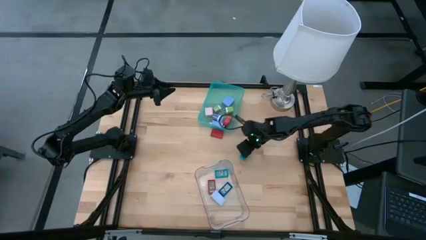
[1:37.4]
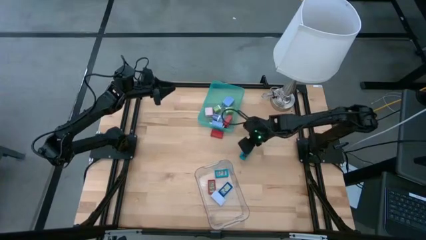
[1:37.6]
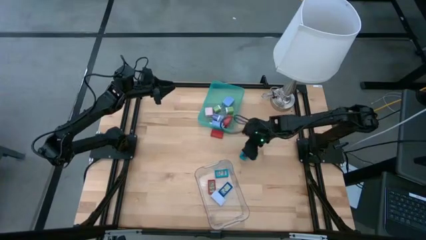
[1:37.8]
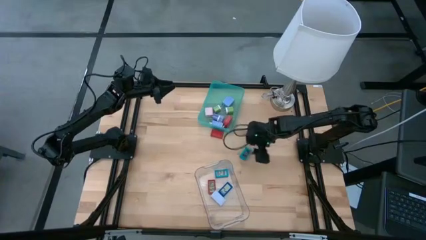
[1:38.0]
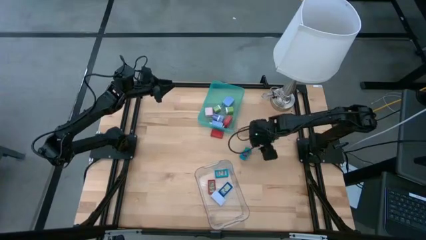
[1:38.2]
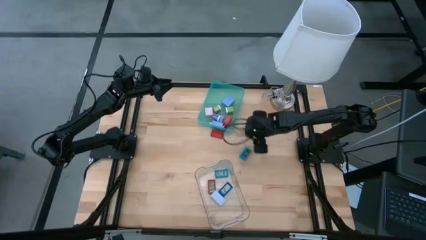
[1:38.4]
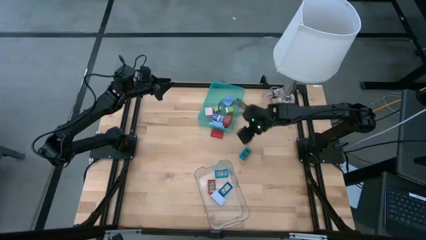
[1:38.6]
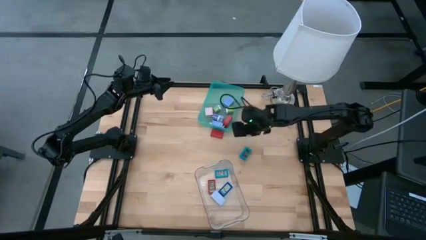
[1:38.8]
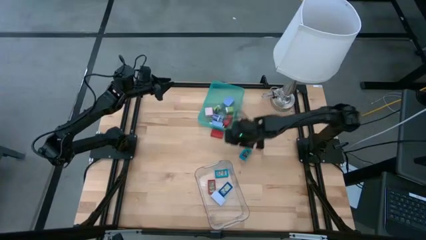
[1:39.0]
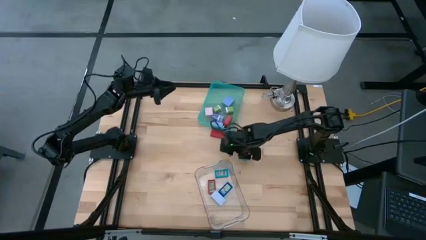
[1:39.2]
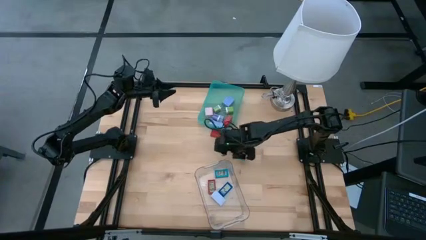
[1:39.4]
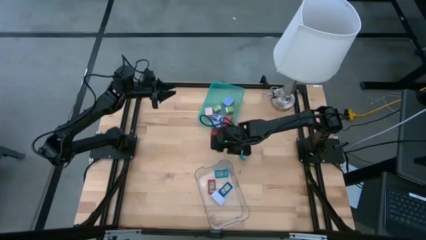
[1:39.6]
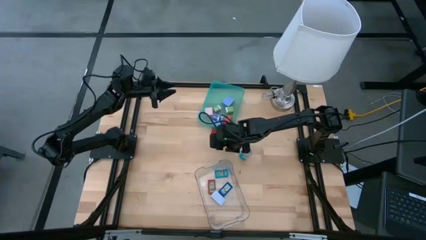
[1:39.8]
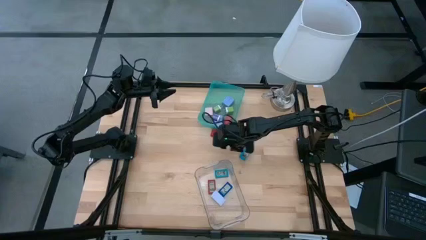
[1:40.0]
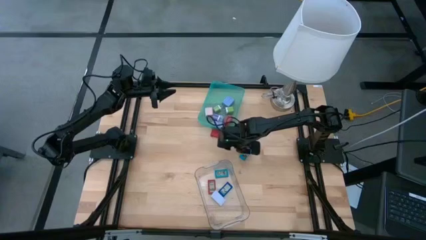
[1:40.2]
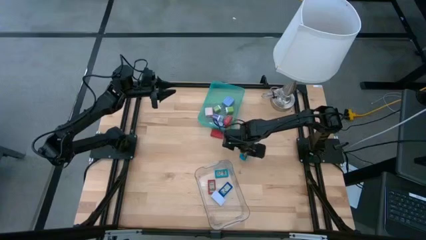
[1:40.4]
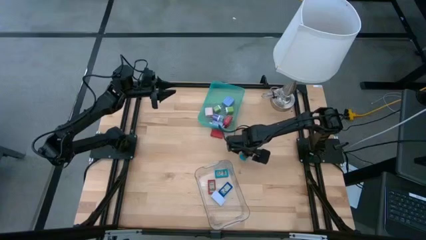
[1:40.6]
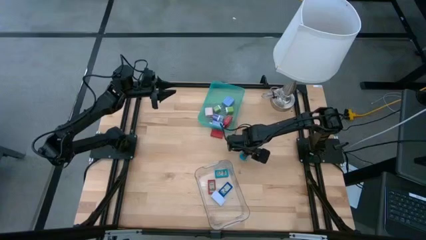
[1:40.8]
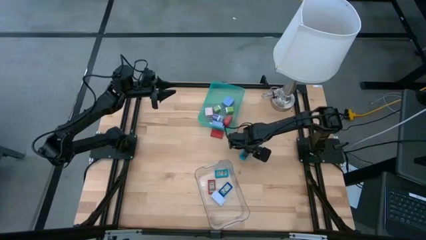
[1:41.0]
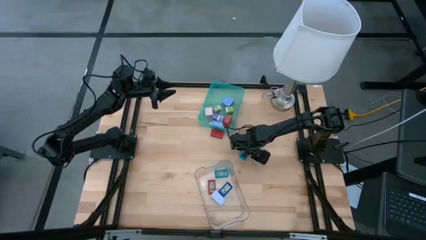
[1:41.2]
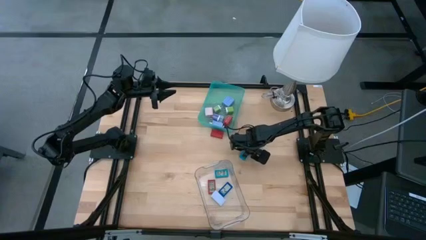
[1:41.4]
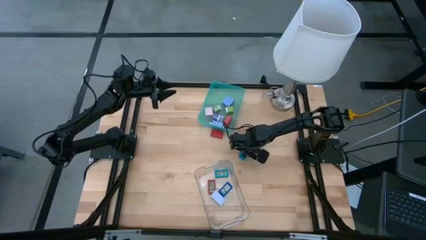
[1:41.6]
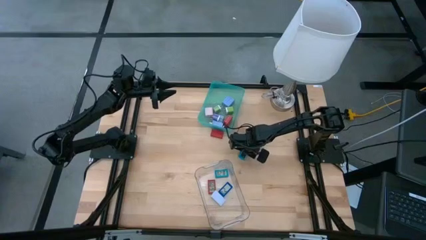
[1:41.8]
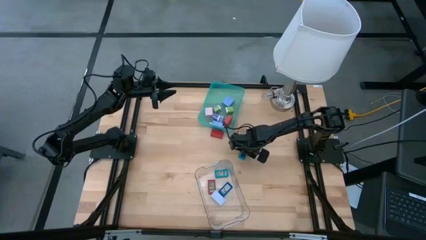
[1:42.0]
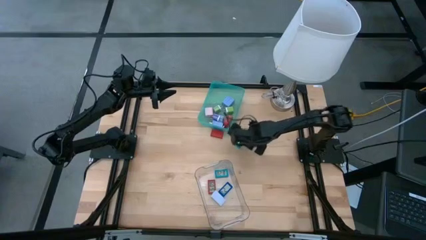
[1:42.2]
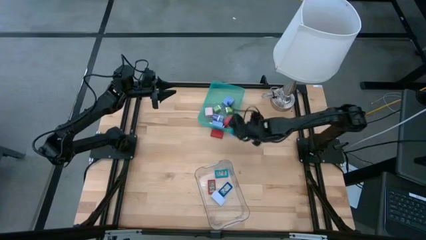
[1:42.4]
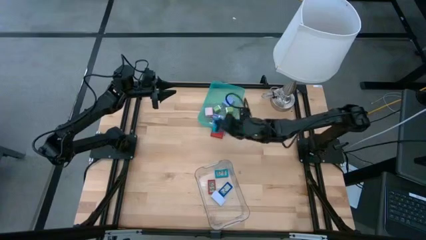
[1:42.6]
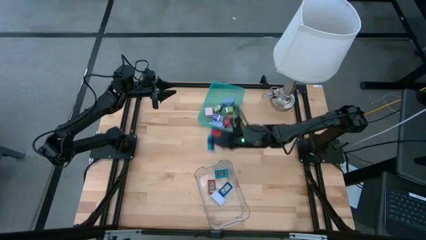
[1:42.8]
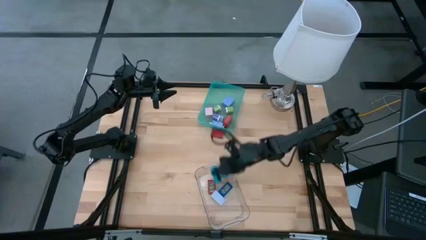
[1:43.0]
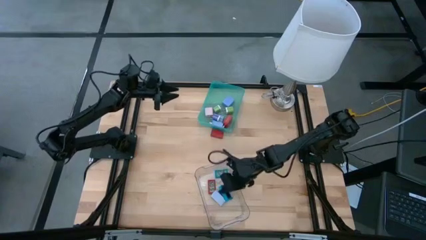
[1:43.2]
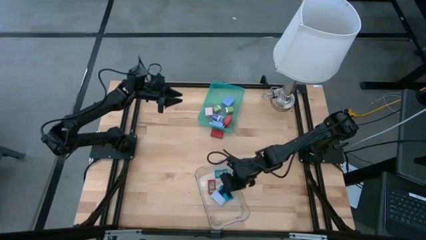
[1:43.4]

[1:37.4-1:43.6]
Task: Pick & Place Office items
Put the blue digital timer into the transparent bin

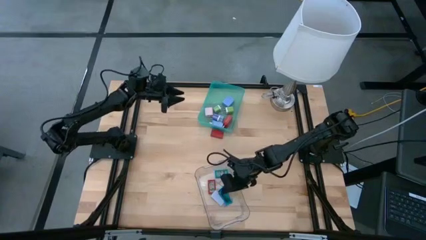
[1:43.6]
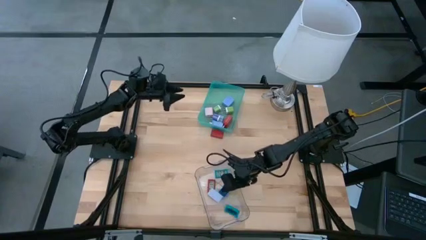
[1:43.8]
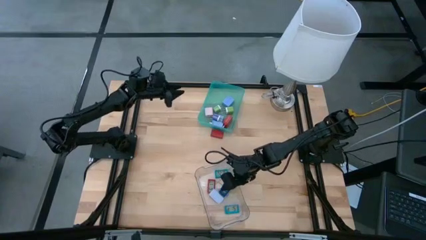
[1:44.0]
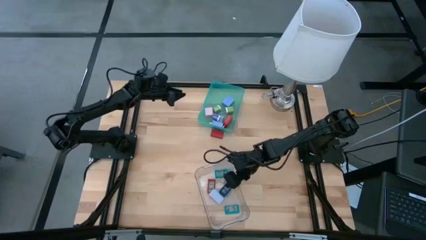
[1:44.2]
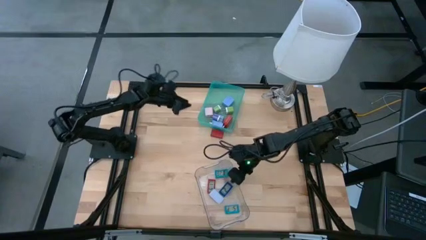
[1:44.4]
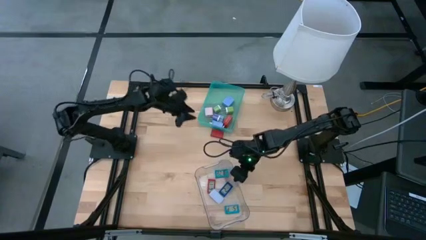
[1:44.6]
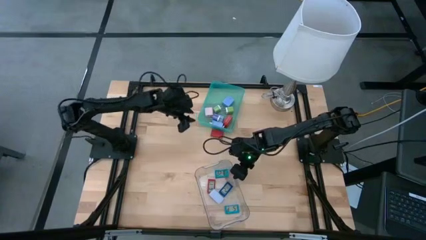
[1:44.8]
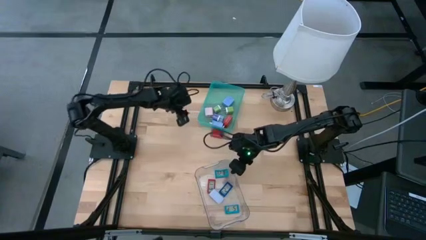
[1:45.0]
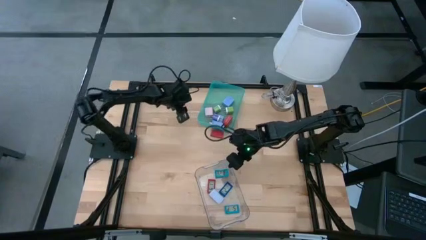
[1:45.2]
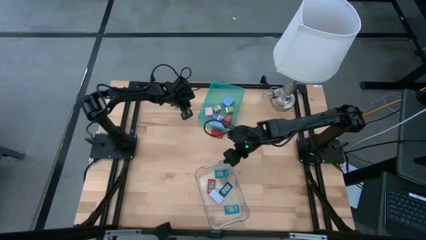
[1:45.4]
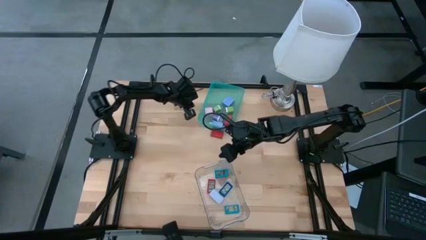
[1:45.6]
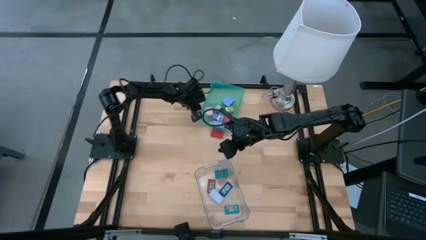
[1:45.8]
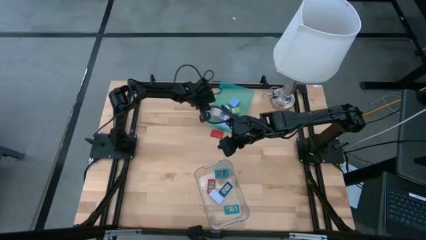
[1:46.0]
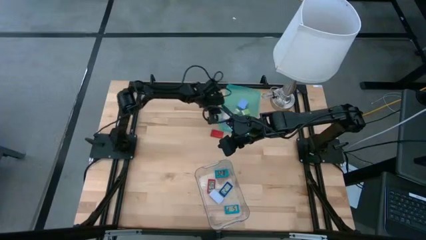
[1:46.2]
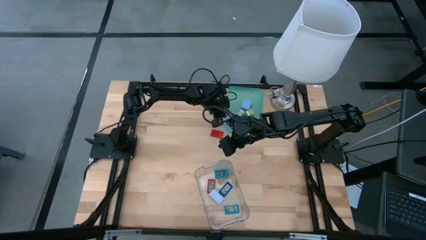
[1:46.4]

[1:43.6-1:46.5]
Adjust the green bin

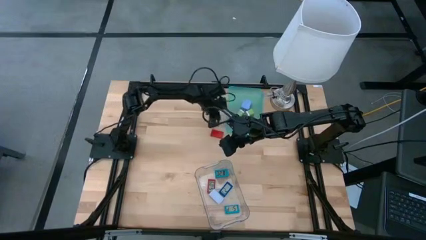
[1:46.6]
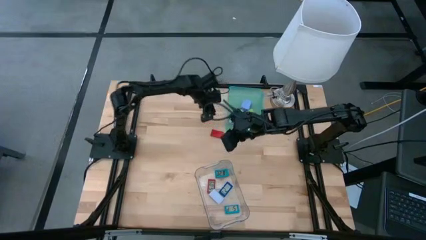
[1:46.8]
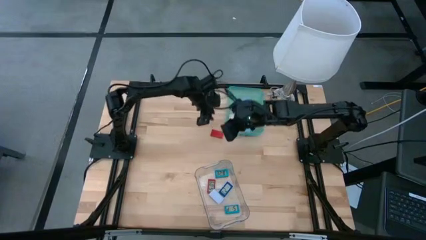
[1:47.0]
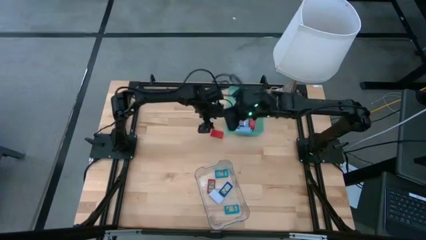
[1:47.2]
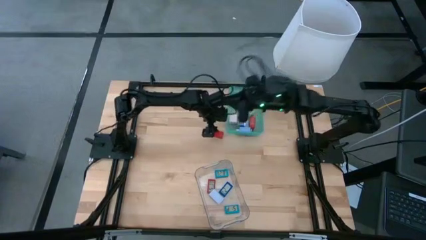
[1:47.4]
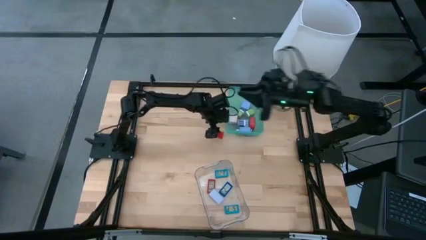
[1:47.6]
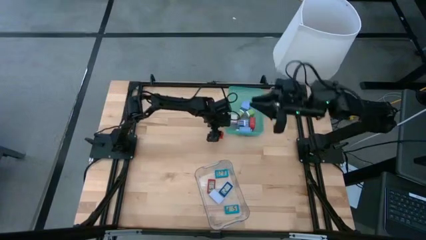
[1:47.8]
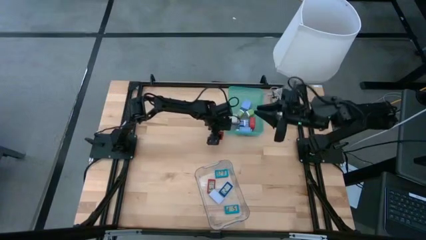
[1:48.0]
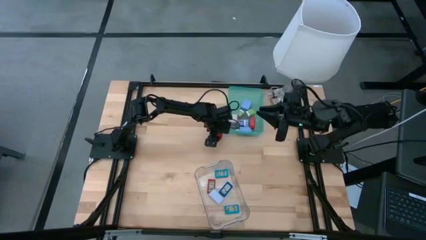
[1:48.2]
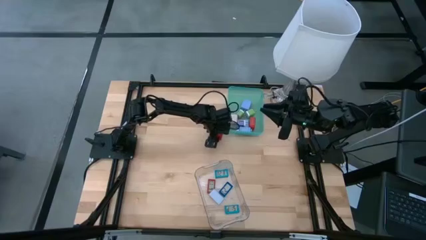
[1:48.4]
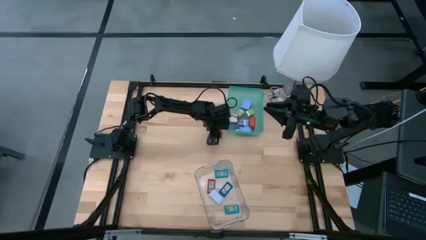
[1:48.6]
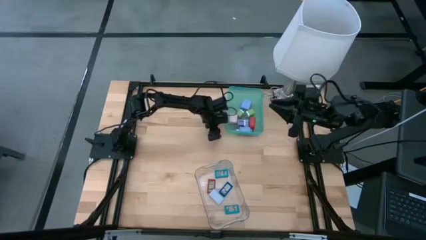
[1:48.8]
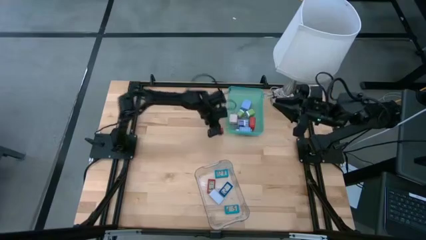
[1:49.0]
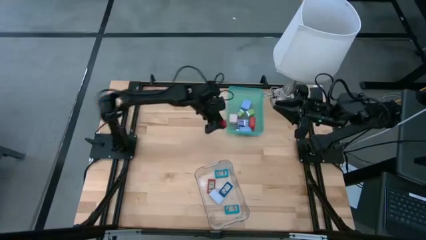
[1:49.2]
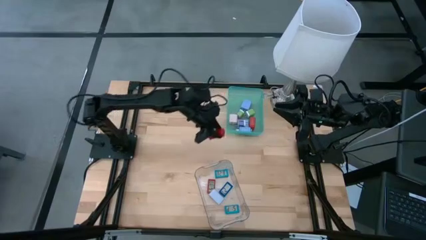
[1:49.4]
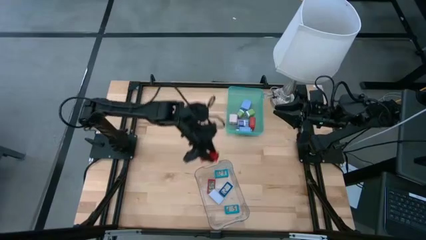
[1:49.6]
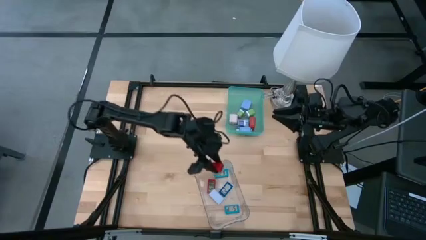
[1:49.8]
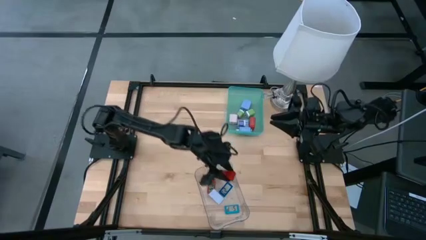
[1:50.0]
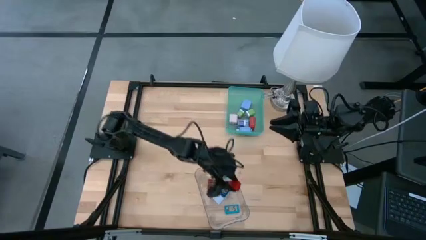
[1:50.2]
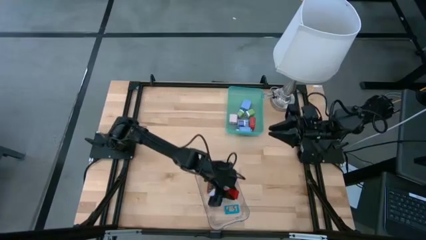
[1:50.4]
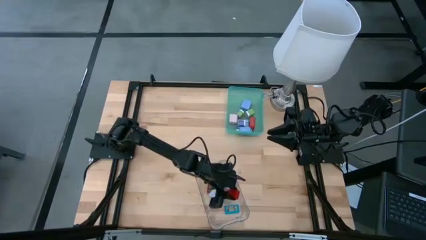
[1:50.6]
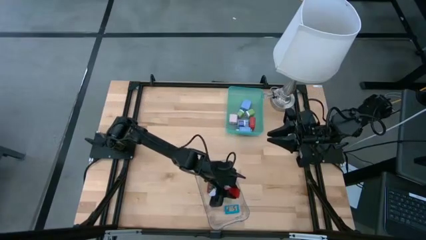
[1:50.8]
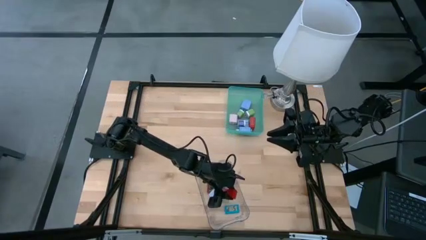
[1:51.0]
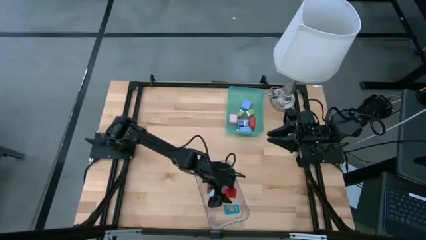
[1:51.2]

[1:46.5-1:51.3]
Put the red digital timer into the transparent bin

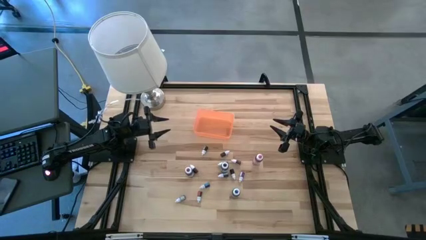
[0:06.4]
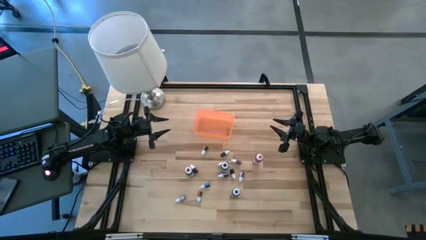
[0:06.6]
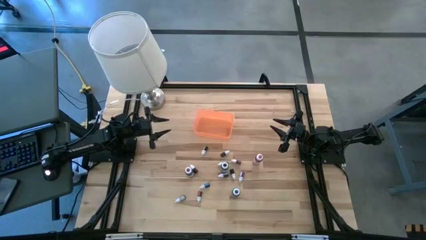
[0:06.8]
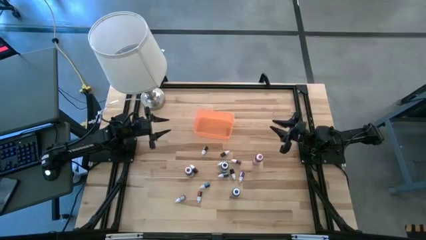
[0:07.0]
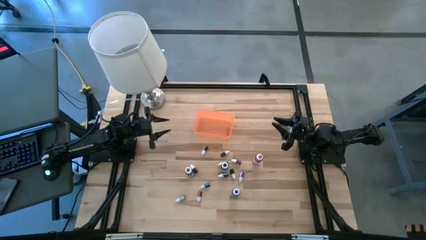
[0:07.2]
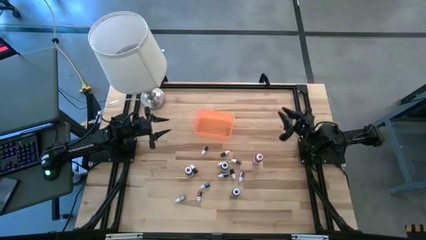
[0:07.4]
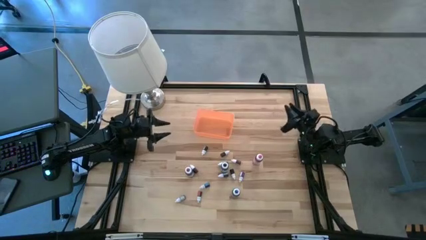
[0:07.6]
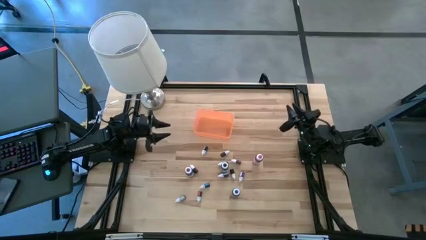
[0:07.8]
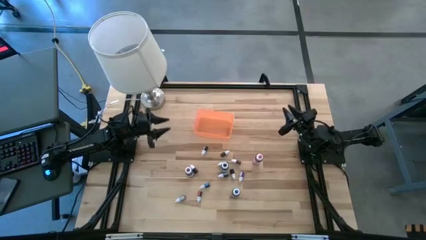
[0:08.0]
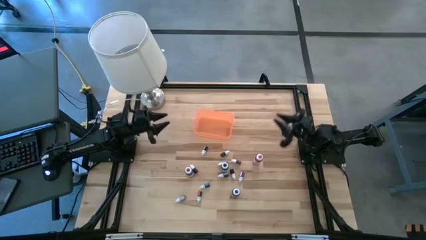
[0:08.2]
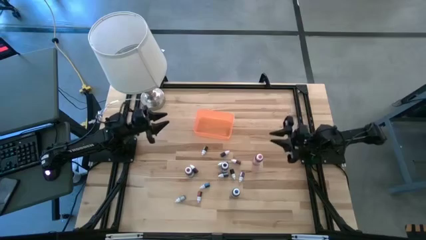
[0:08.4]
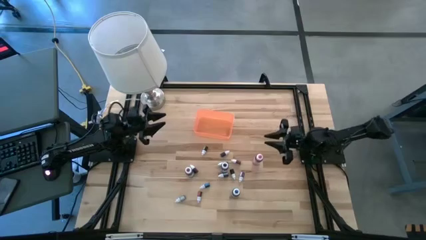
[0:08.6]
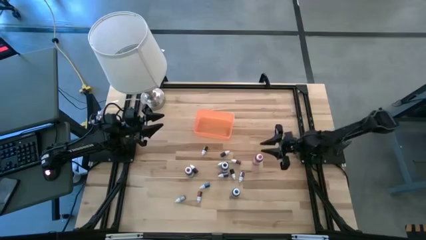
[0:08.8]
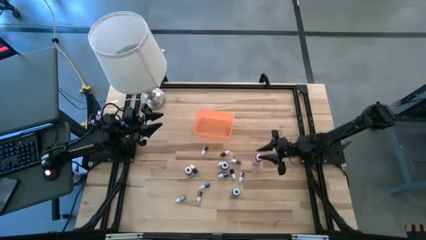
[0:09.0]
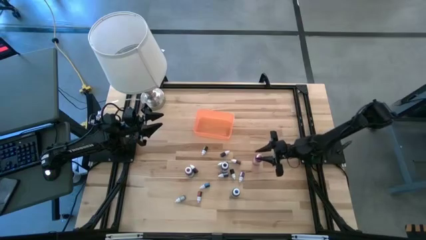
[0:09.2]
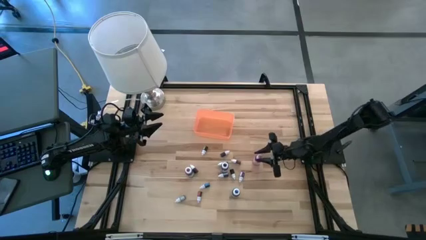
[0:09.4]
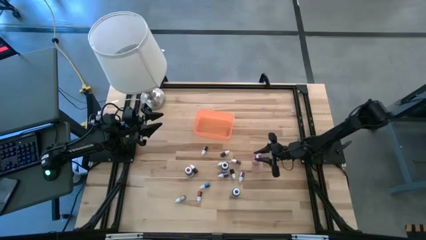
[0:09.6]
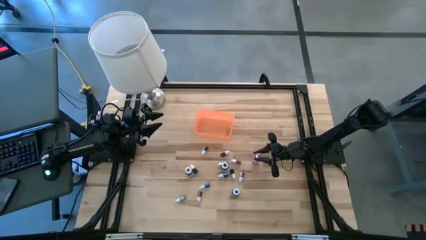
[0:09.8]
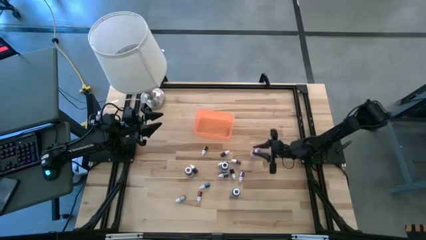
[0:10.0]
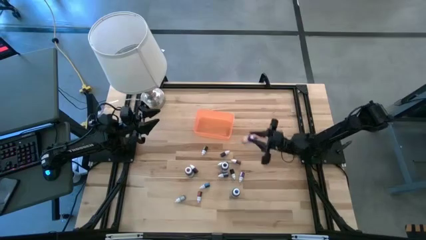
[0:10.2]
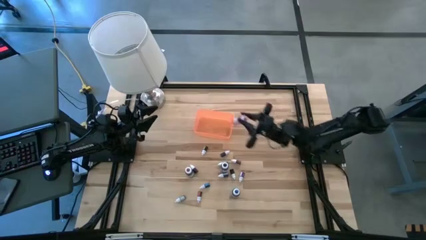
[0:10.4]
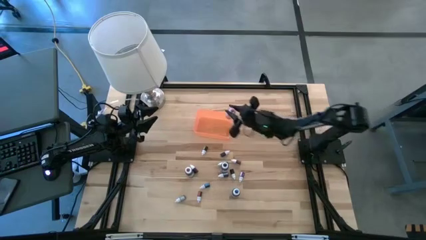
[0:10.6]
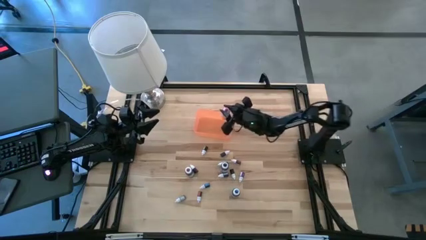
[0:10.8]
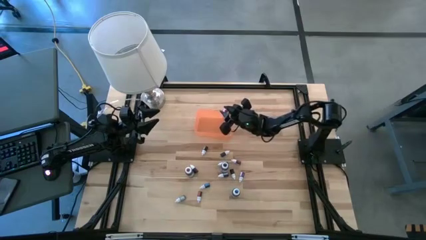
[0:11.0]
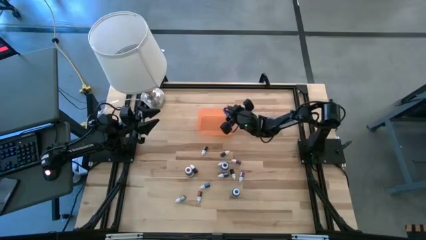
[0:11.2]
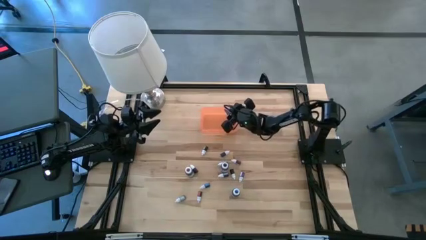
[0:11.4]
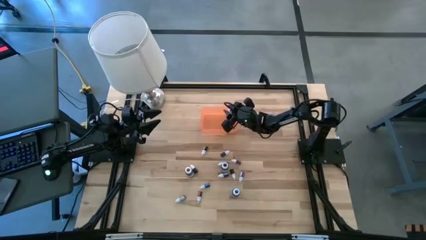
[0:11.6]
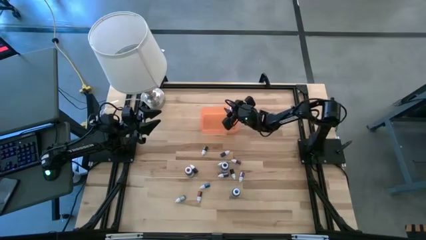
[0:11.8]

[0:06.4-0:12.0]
Task: Pick & Place food coloring
Put the large red food coloring bottle into the bin
